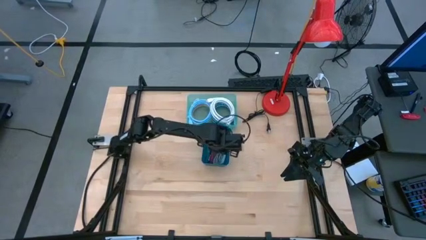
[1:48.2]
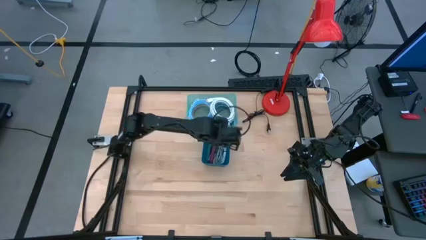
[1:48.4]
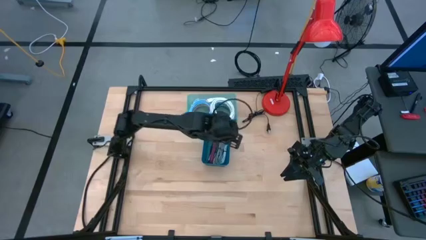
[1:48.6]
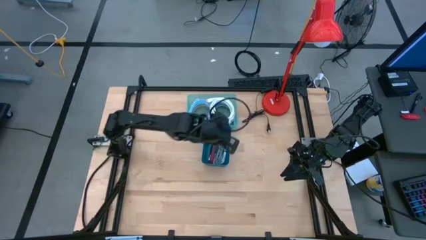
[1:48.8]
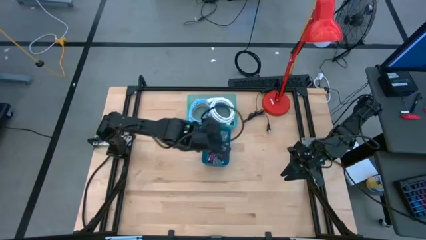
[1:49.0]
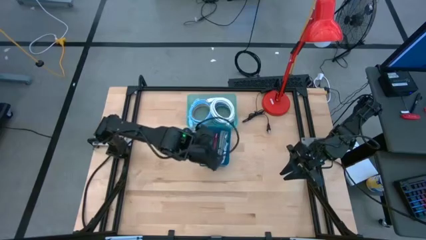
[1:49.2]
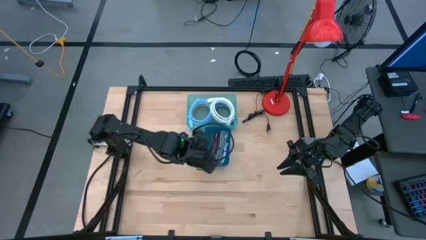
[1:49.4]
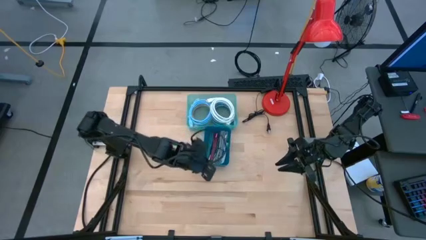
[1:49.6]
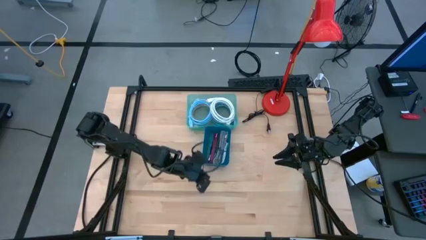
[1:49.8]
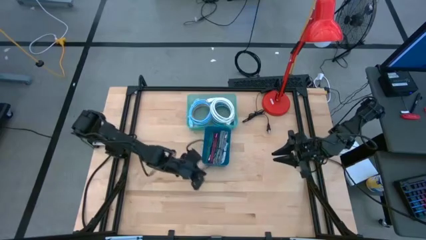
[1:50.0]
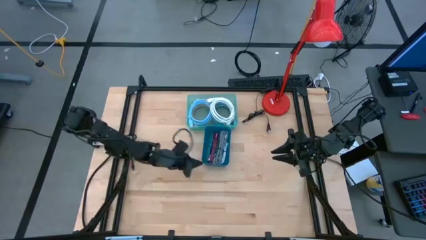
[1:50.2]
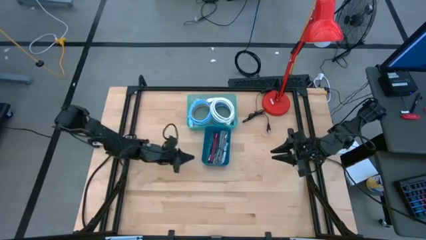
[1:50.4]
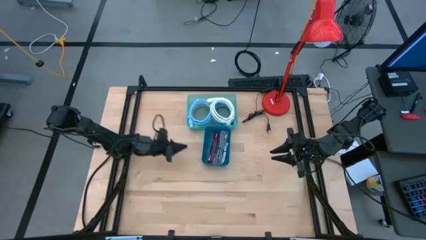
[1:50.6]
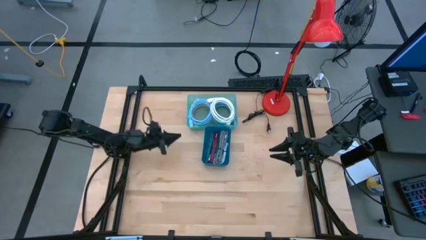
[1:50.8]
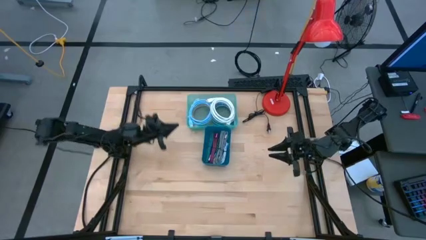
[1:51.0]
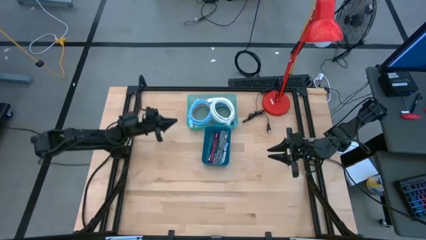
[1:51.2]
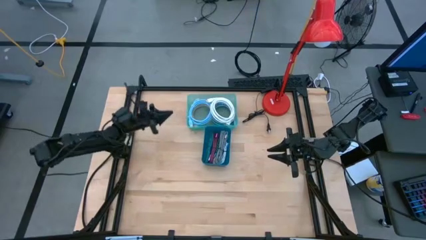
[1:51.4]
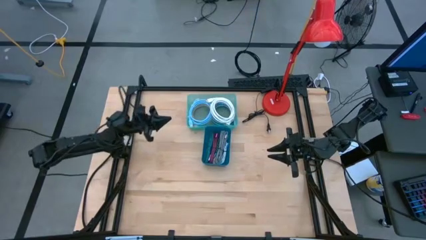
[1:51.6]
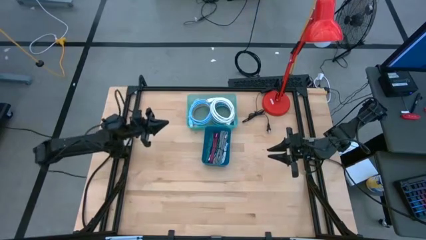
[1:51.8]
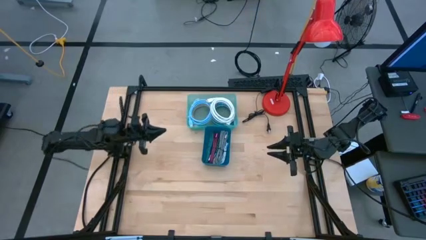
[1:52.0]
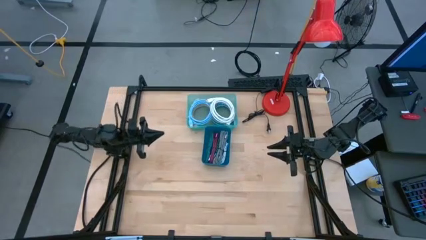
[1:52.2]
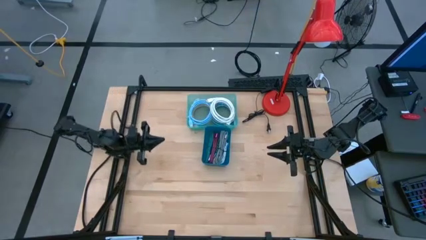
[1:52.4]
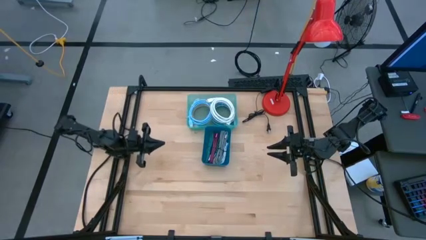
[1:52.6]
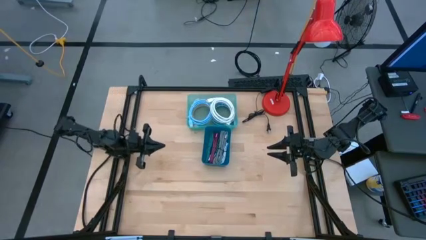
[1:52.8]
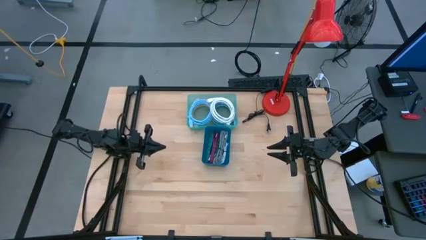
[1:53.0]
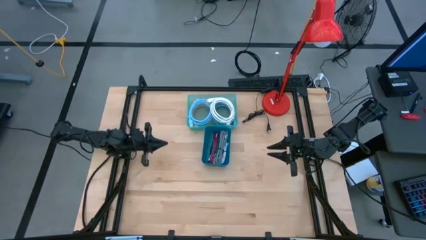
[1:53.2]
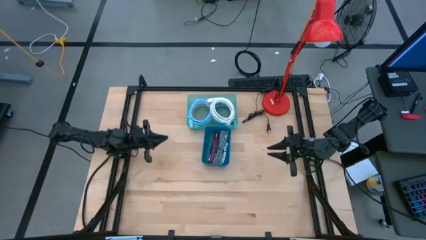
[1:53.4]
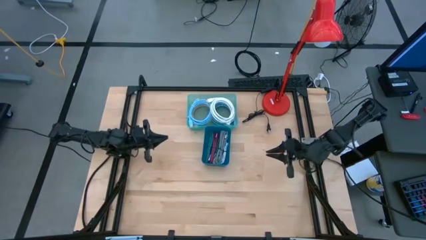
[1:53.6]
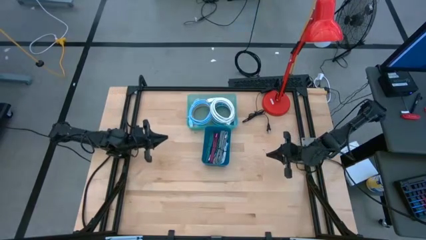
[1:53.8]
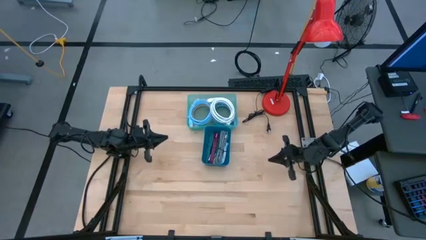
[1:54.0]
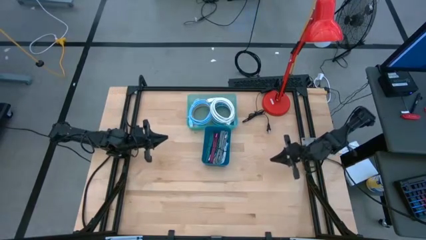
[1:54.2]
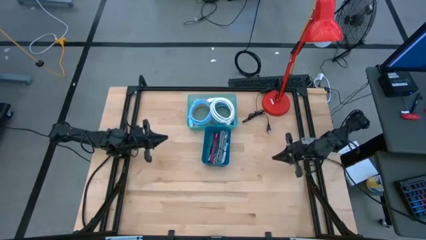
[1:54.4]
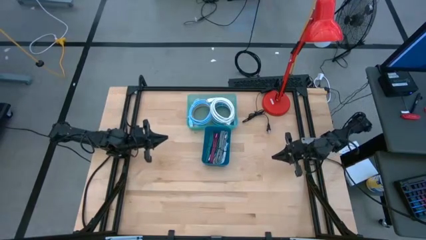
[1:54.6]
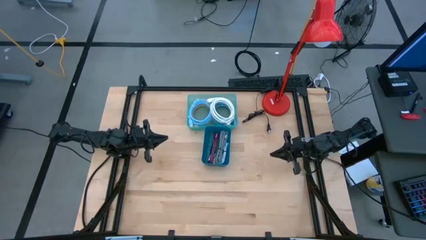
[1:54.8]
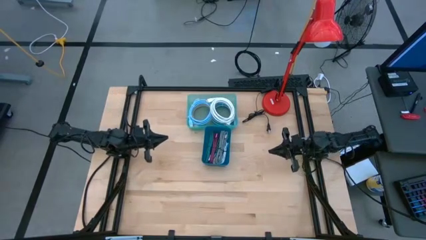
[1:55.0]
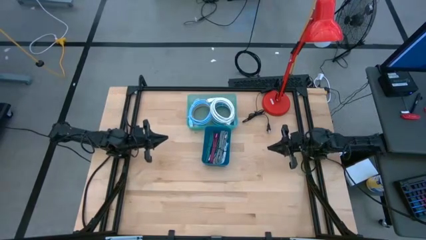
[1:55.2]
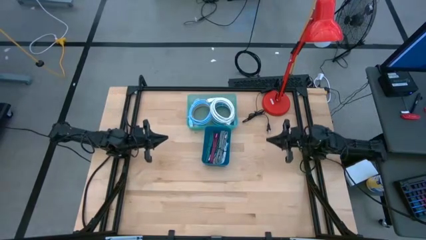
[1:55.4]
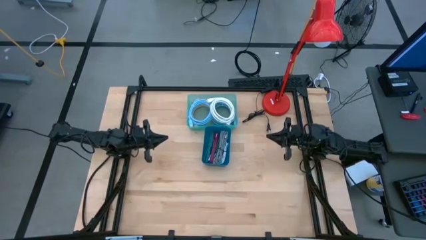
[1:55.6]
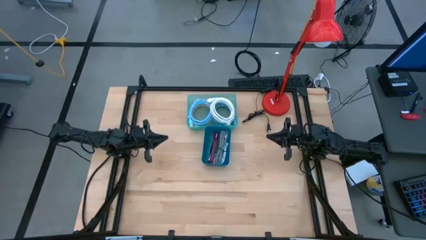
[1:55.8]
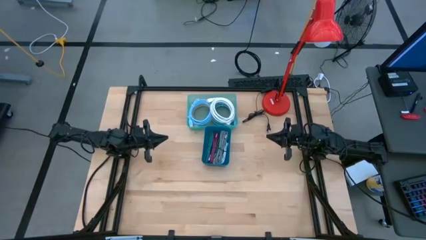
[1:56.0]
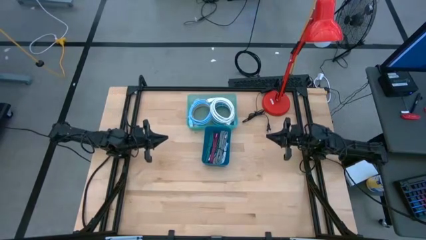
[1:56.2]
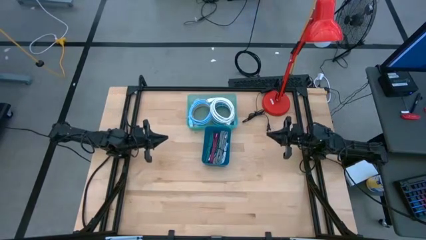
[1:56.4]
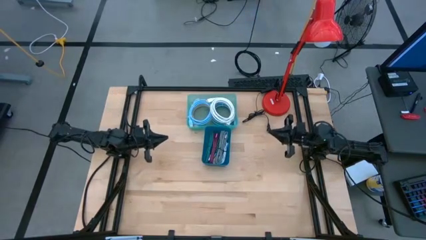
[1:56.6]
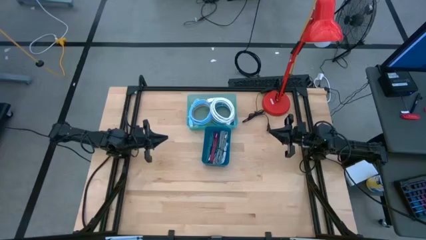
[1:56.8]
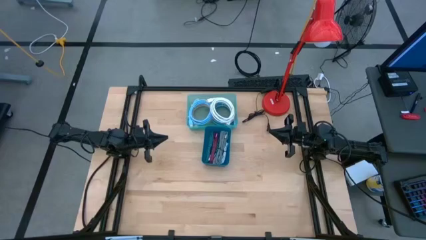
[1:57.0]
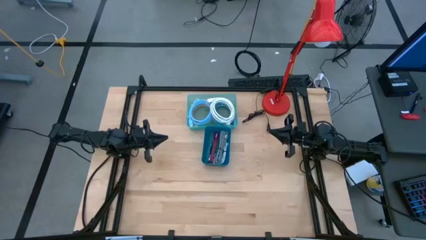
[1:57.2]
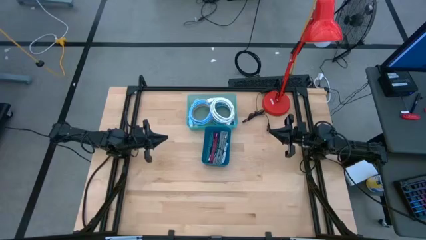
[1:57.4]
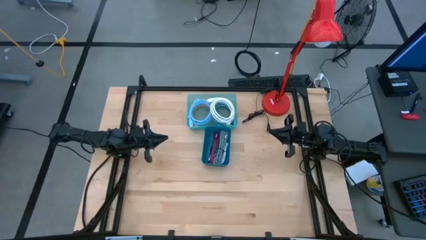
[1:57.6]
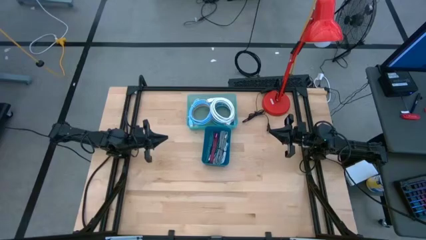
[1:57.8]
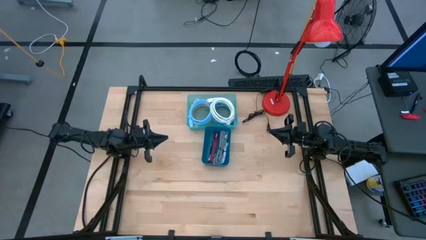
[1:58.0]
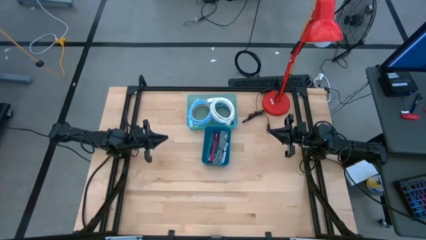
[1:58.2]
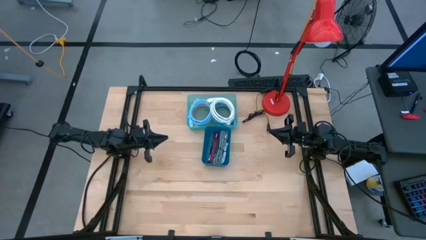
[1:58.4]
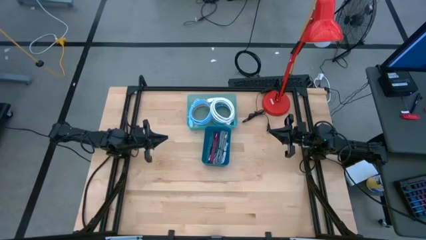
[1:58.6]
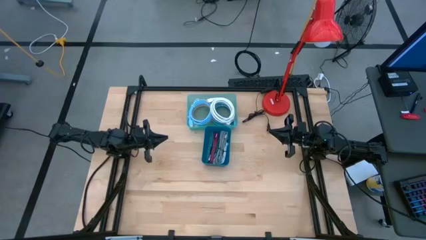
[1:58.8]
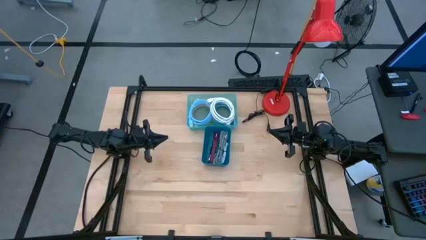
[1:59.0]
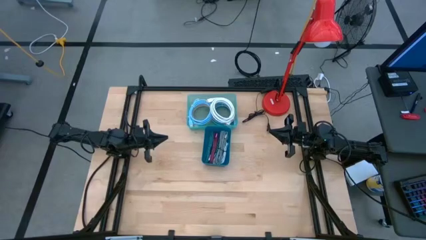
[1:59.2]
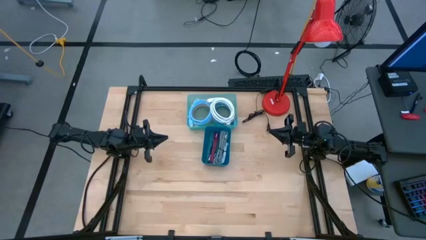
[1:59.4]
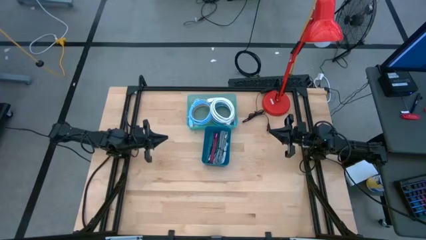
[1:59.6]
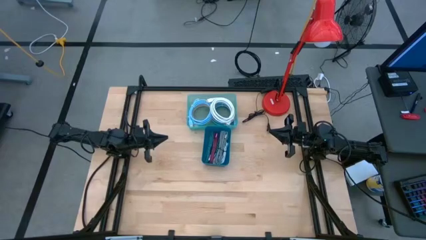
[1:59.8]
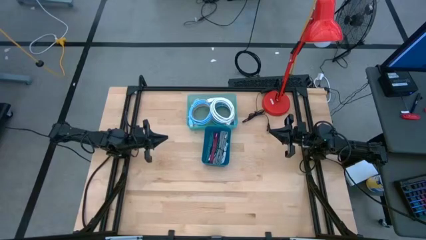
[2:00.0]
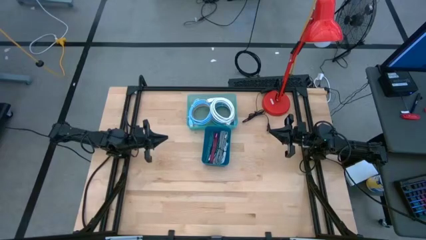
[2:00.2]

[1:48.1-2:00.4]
Task: Pick & Place USB Port
Return to Home Position

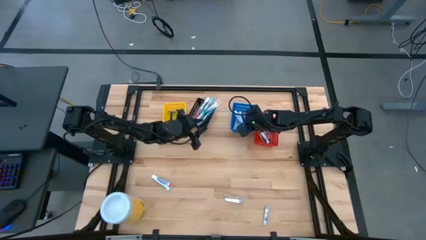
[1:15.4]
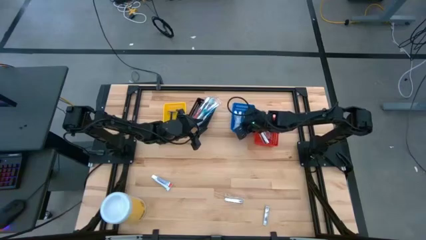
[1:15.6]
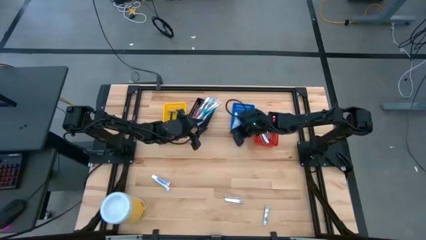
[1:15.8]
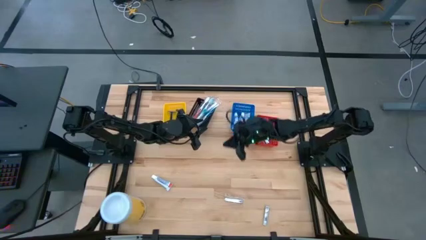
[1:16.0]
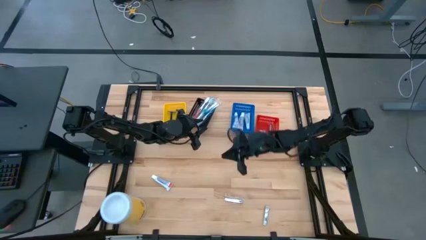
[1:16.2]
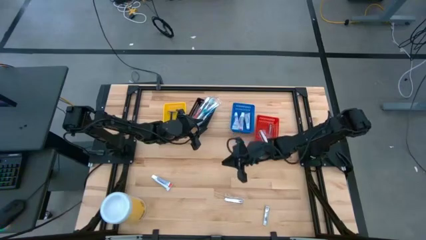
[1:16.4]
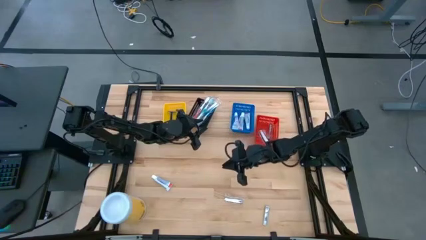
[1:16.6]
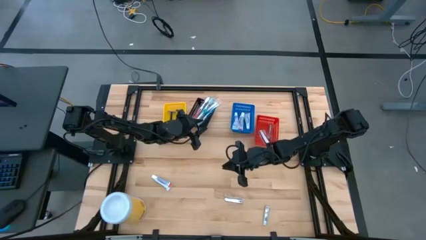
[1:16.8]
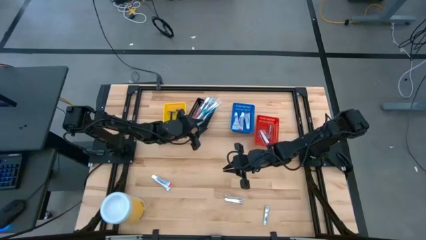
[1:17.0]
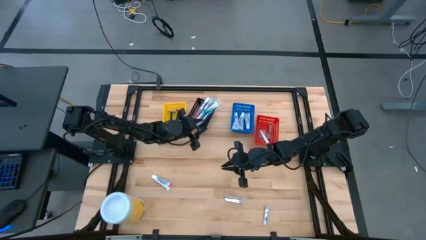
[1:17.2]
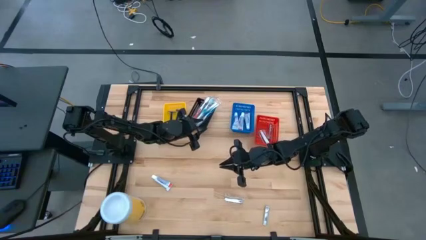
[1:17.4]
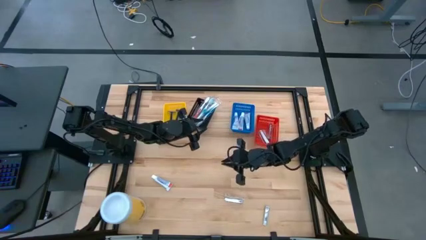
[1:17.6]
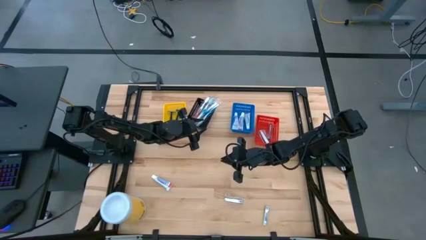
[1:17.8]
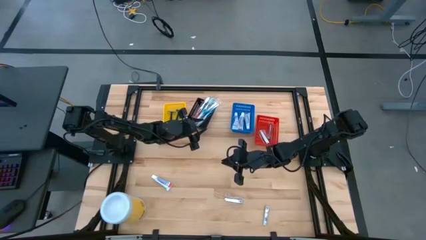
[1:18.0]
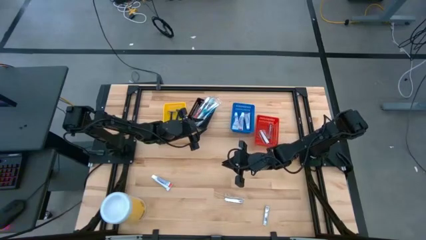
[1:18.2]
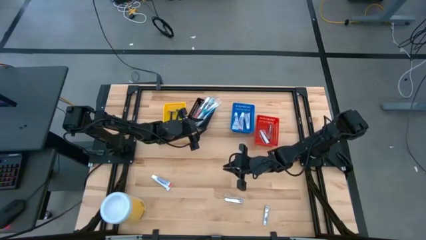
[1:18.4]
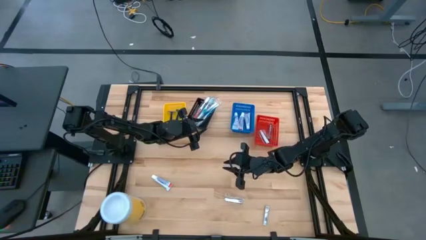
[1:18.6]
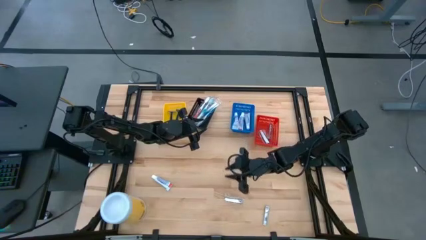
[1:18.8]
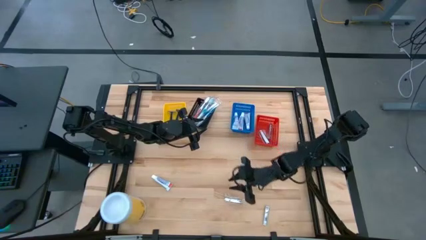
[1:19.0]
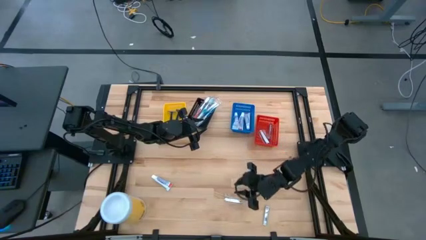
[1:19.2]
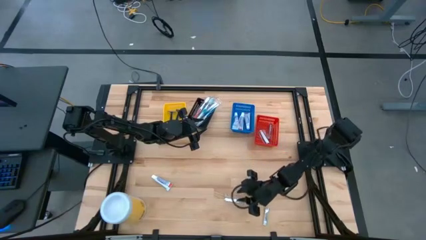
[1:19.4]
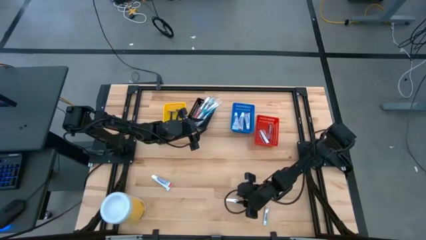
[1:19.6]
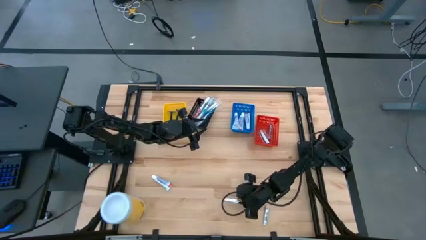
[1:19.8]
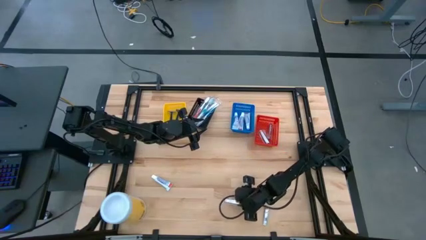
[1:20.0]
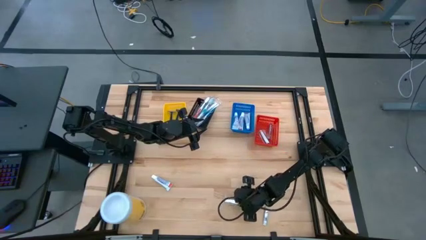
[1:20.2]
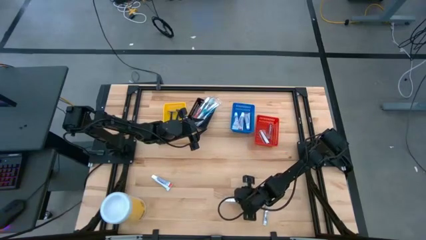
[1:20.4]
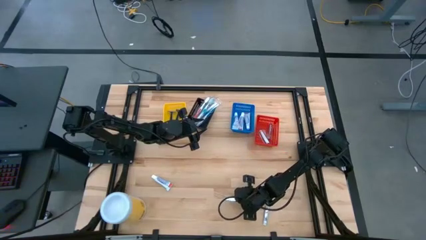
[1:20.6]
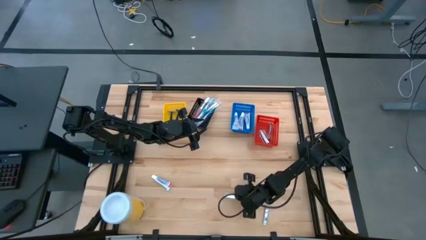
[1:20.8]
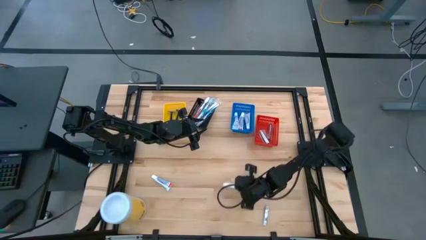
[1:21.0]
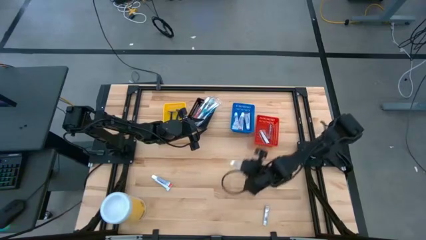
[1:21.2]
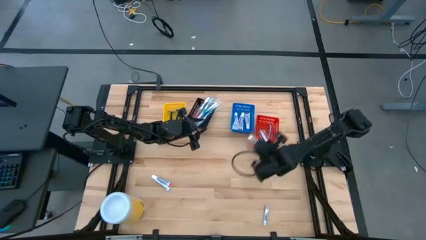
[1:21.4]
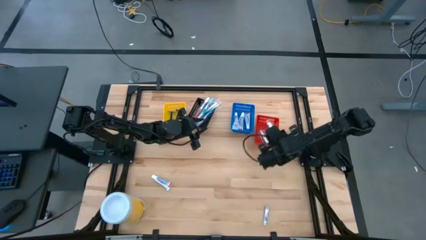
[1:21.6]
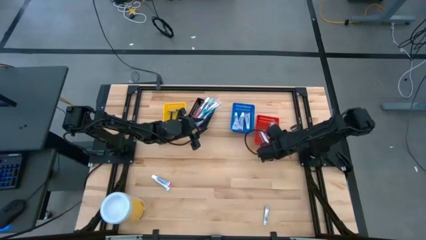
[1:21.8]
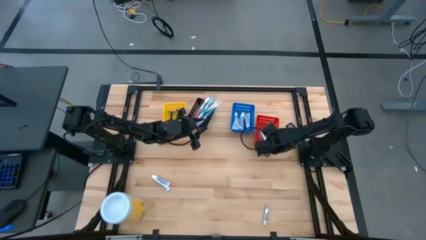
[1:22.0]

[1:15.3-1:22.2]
Task: Pick & Place Travel size toiletries
Put the silver nail cutter into the red bin
